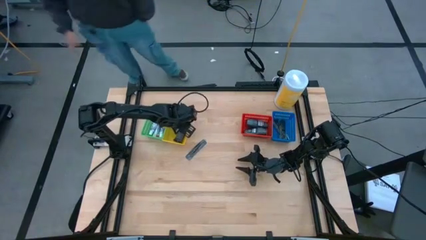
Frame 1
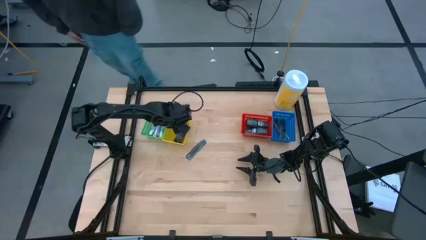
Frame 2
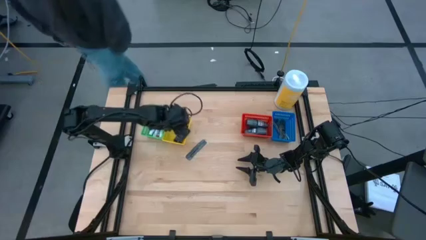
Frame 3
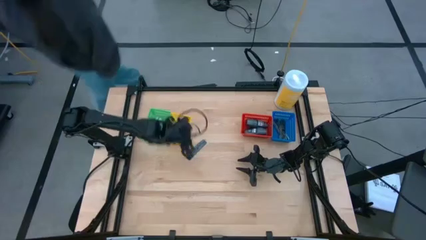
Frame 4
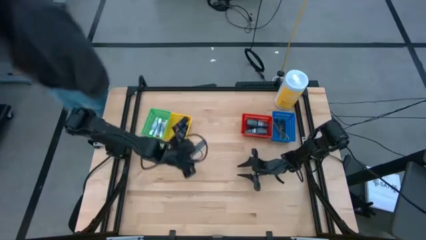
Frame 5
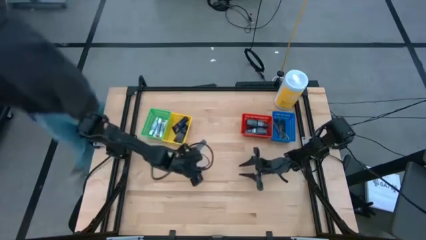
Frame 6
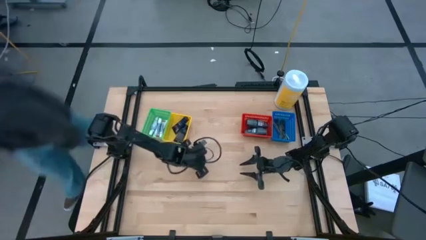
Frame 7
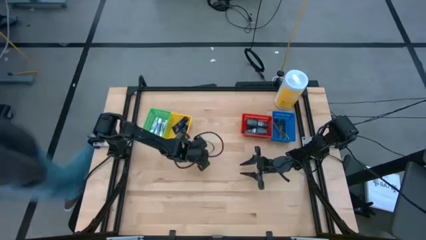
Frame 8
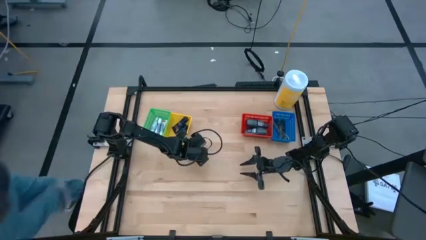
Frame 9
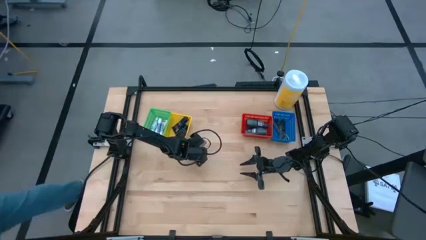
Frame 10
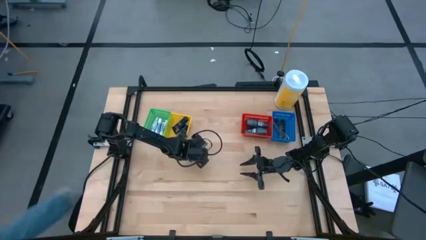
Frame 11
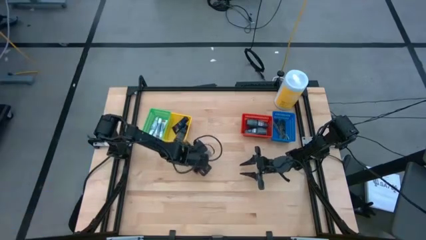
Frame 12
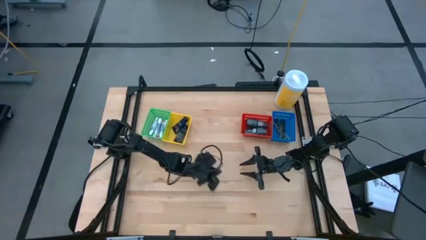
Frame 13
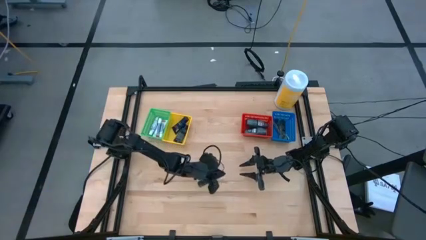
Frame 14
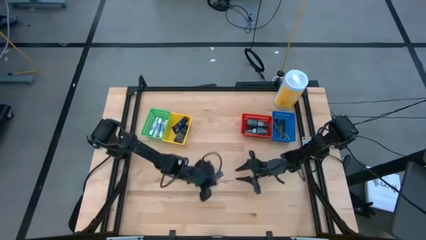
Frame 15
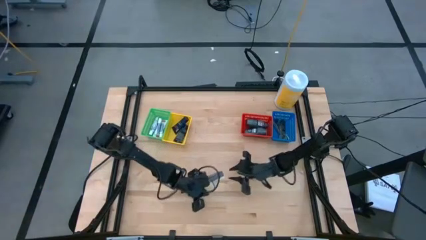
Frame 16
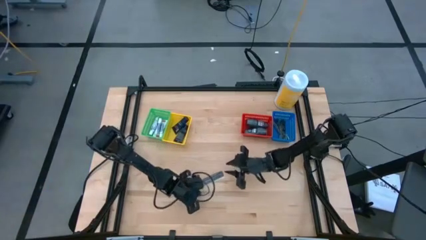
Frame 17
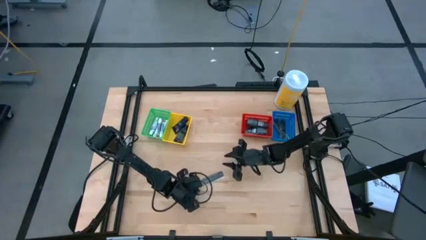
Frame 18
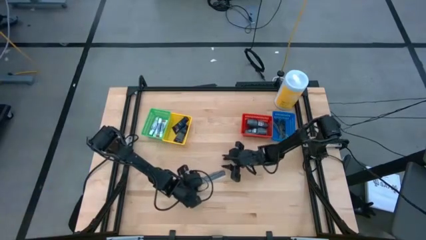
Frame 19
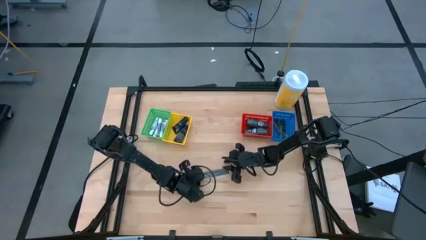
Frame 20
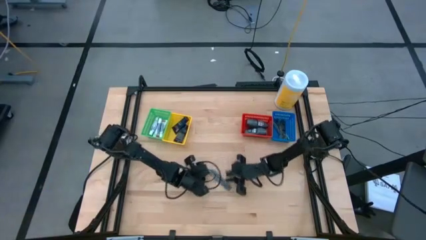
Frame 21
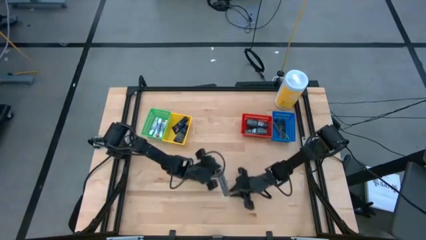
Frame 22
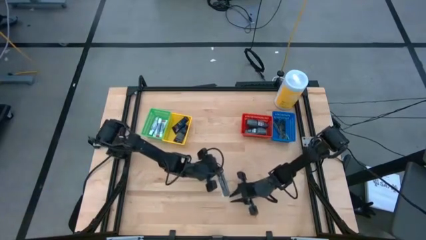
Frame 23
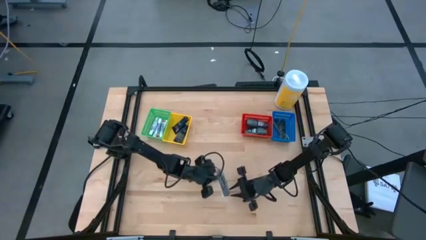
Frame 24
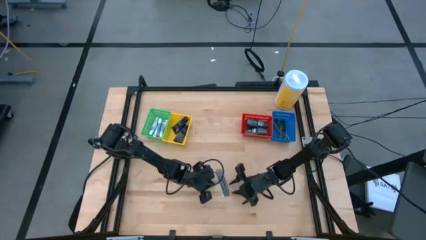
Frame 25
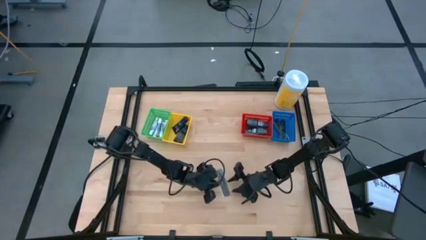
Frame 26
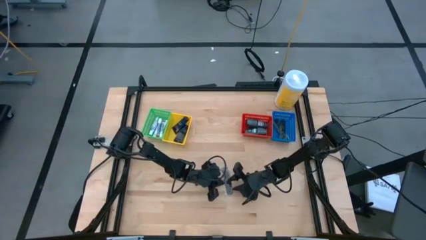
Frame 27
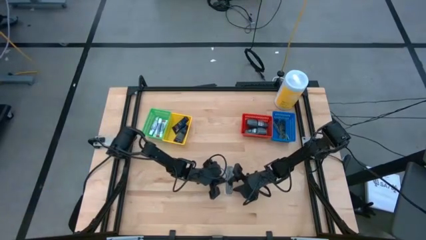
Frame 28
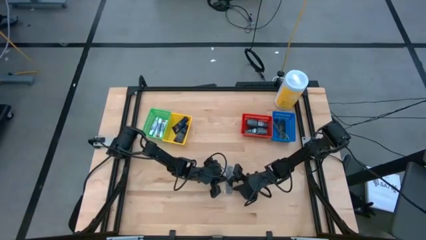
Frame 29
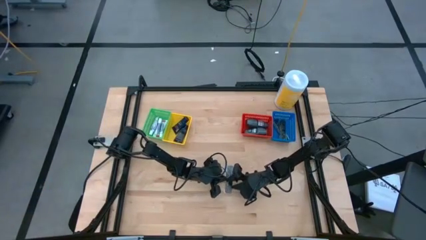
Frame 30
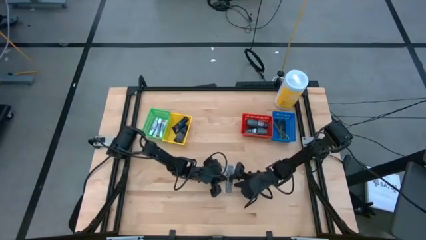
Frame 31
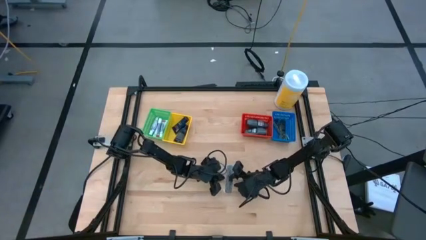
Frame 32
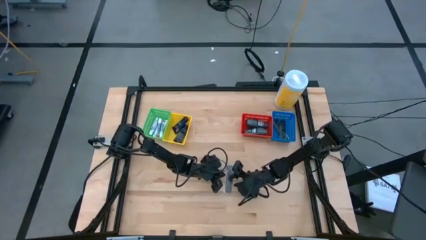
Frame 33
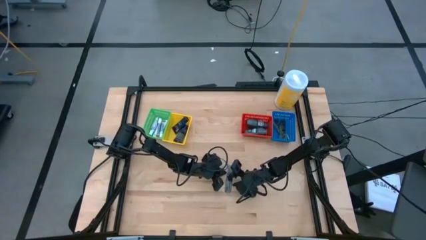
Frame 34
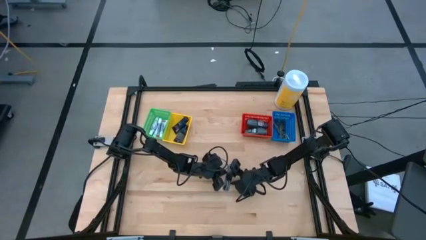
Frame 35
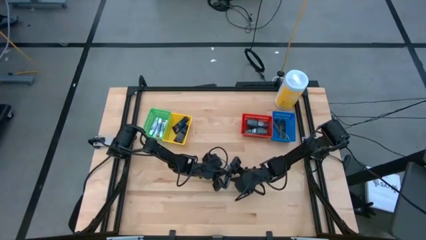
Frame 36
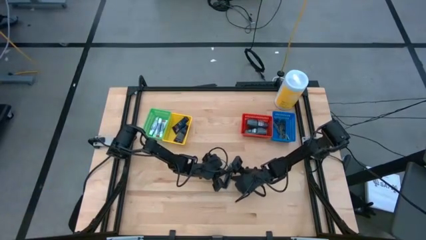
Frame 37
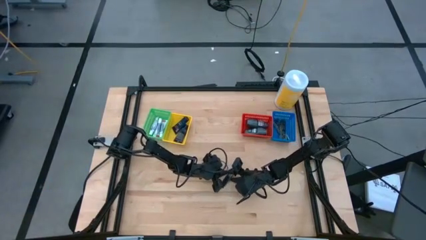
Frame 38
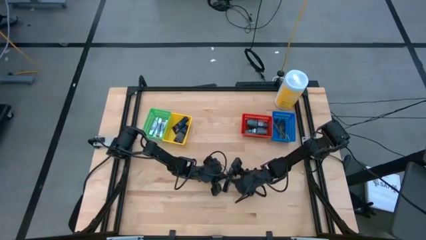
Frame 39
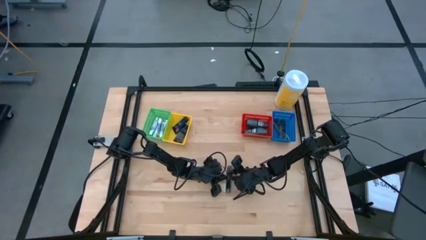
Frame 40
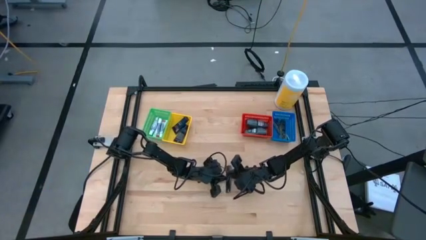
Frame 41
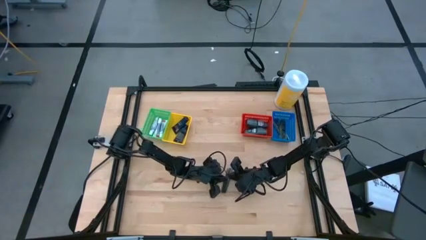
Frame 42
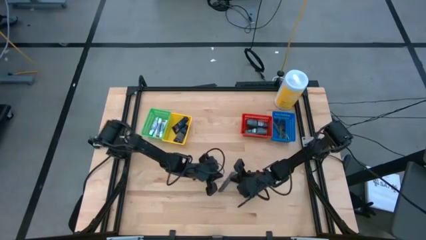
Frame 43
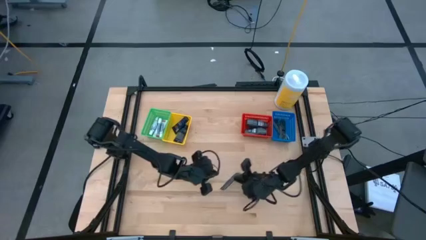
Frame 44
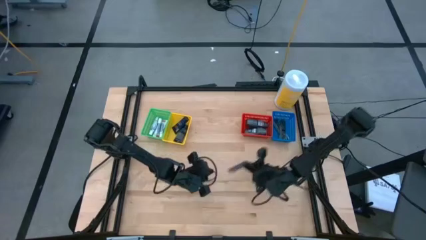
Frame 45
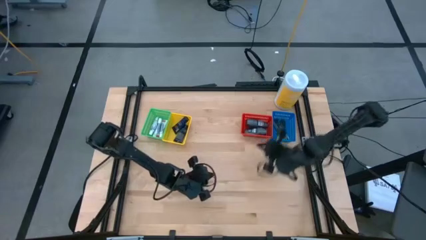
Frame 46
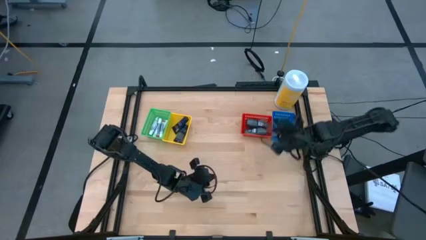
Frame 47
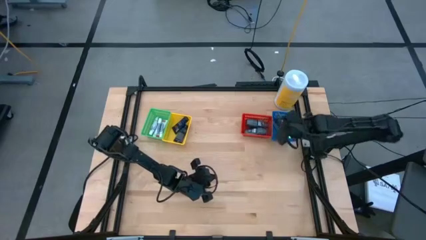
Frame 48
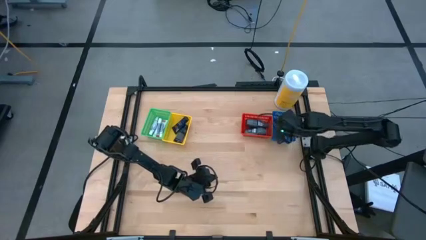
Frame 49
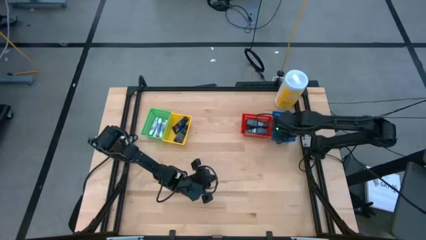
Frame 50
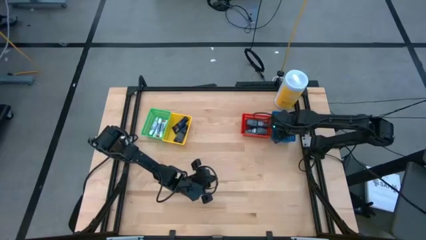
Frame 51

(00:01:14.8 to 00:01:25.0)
Task: Pick & Place Travel size toiletries
Put the comb into the blue bin
